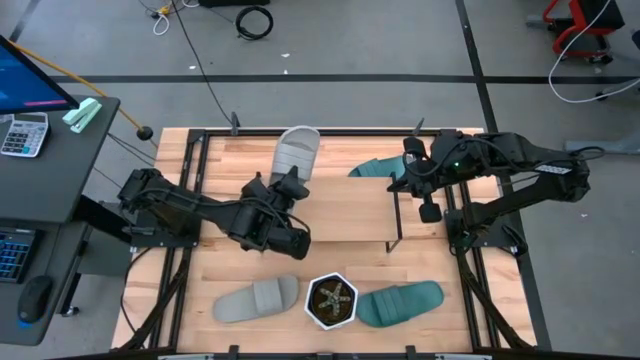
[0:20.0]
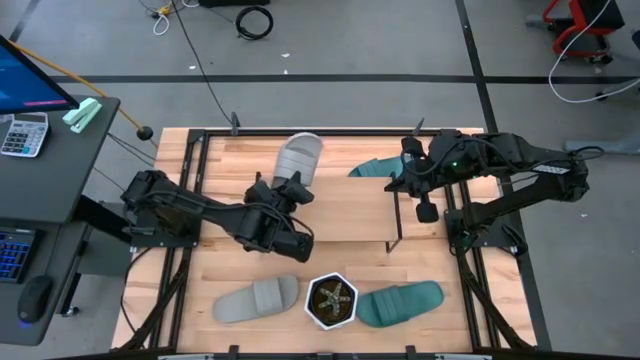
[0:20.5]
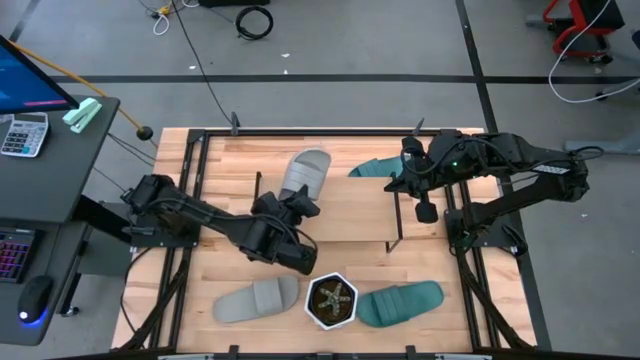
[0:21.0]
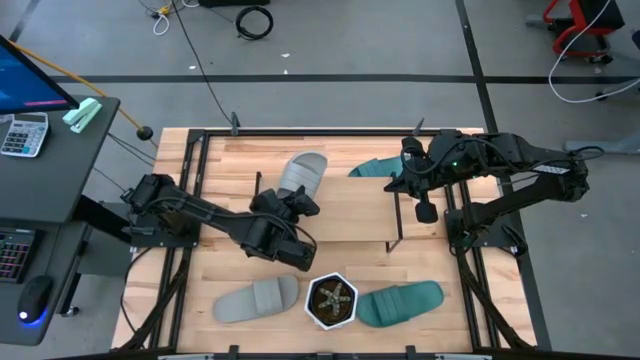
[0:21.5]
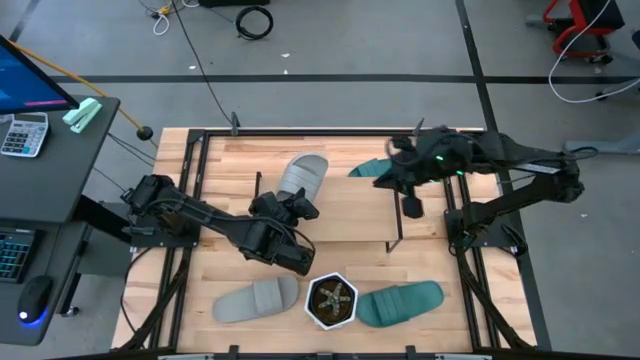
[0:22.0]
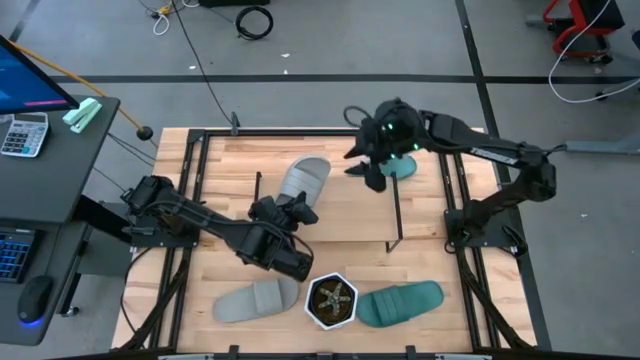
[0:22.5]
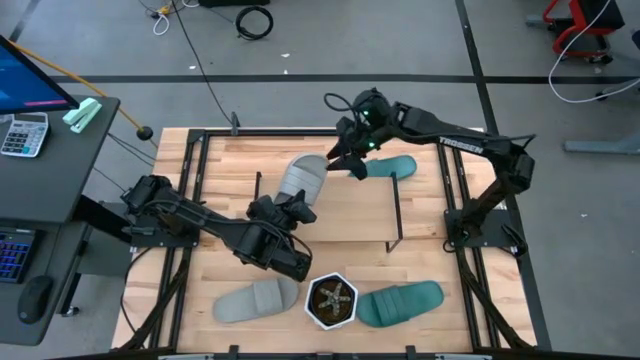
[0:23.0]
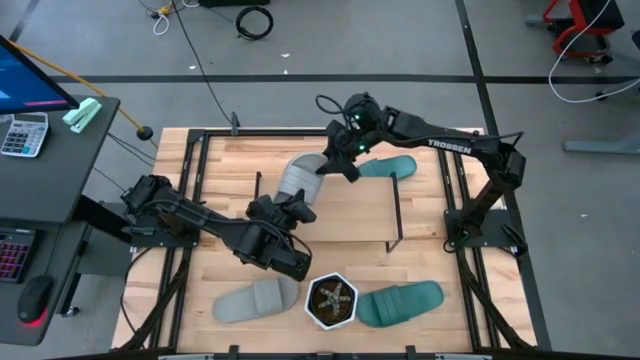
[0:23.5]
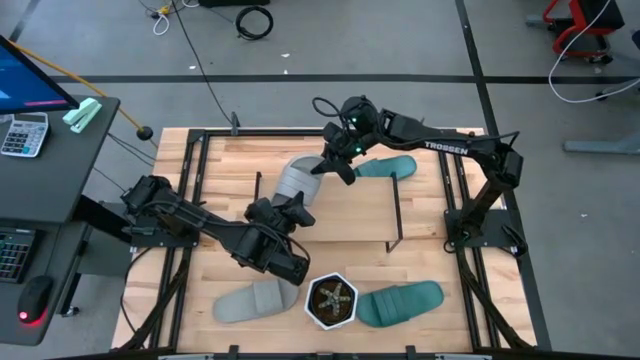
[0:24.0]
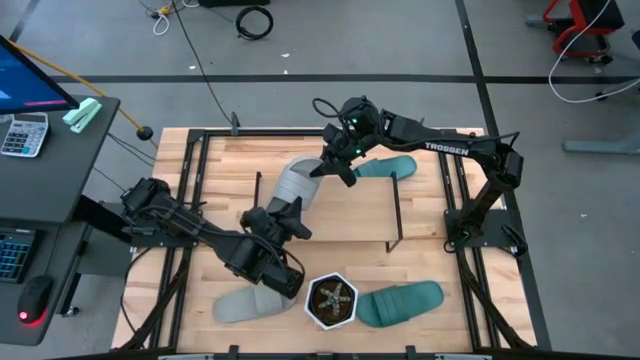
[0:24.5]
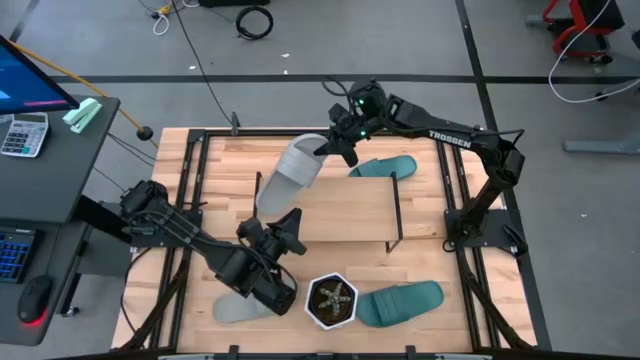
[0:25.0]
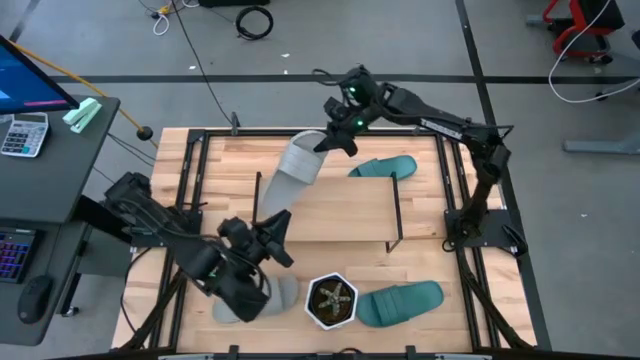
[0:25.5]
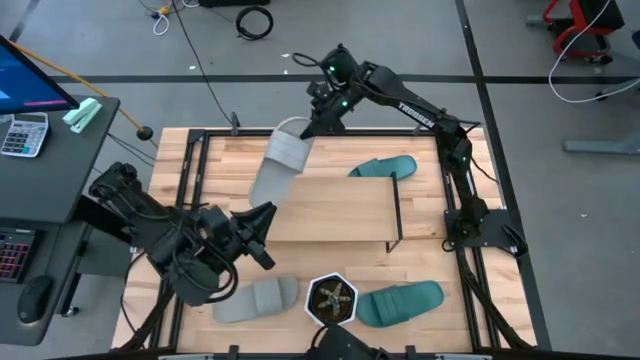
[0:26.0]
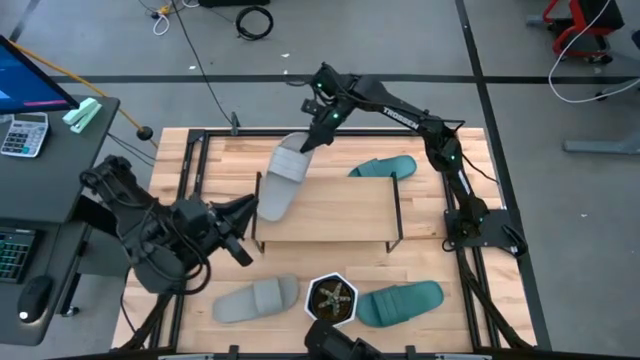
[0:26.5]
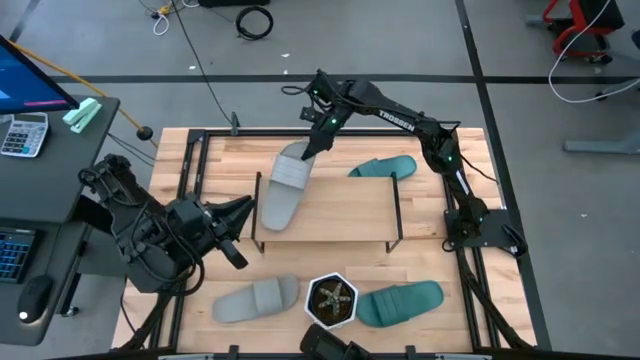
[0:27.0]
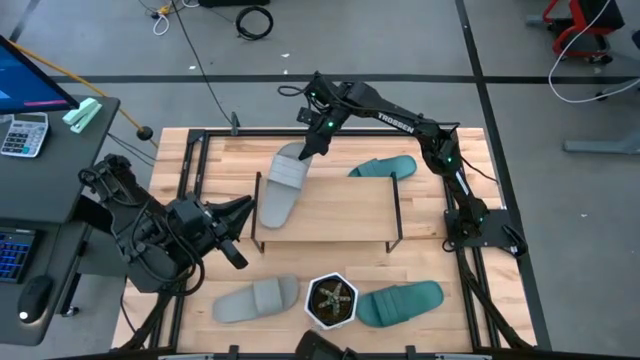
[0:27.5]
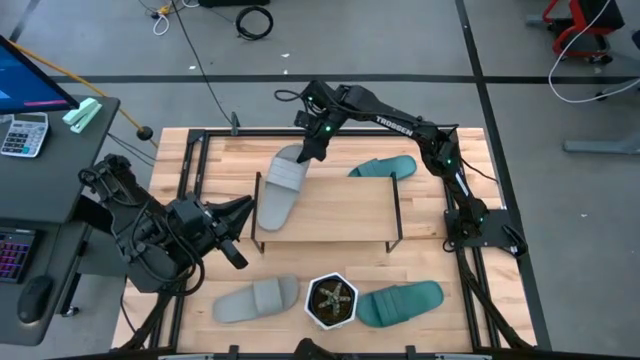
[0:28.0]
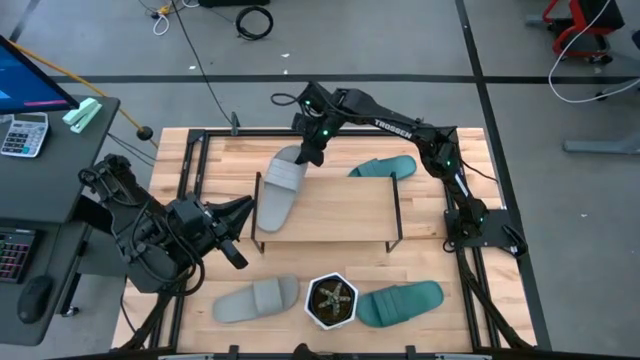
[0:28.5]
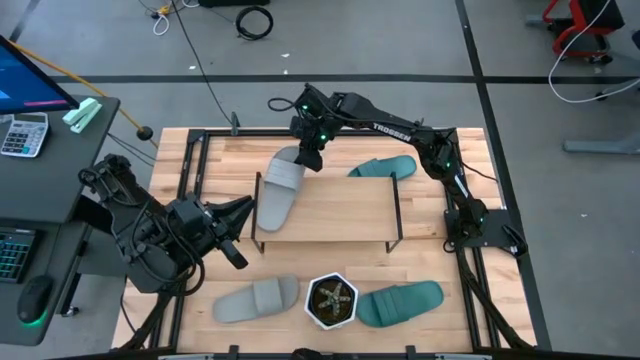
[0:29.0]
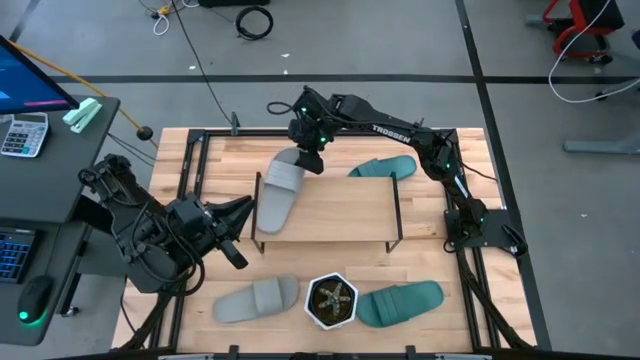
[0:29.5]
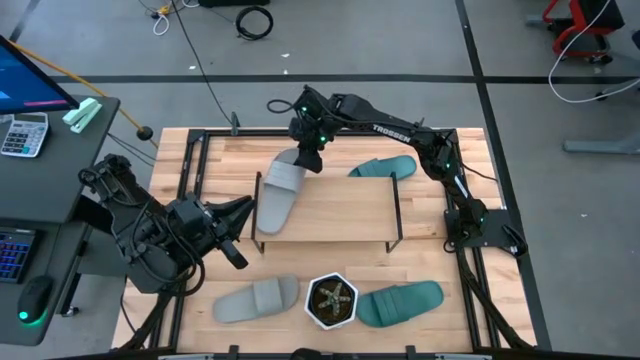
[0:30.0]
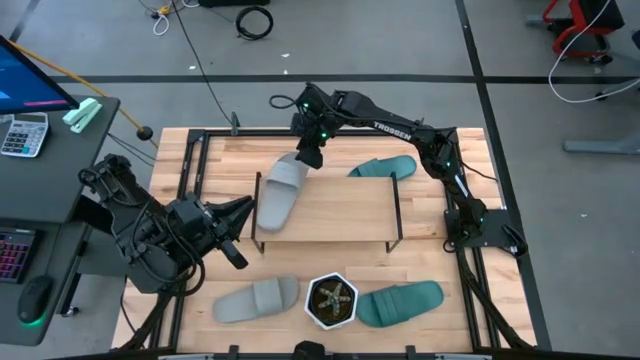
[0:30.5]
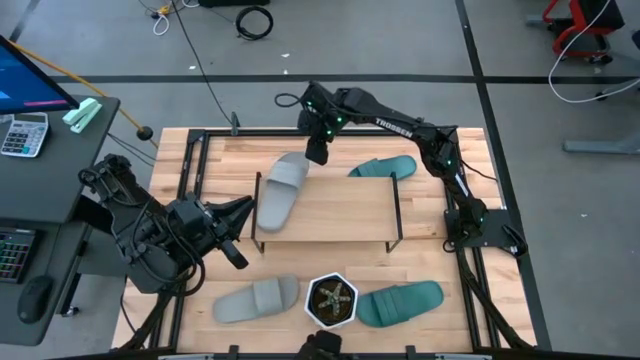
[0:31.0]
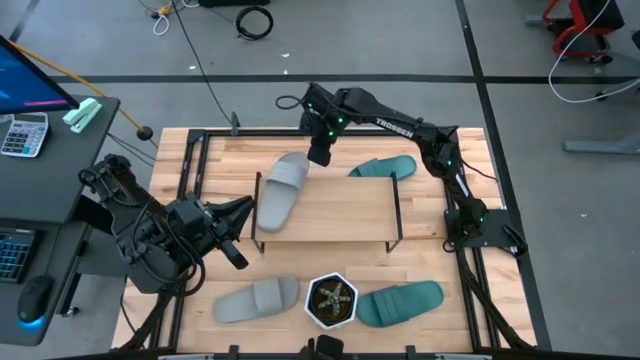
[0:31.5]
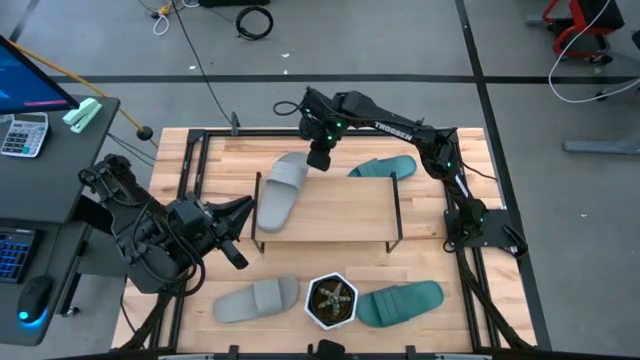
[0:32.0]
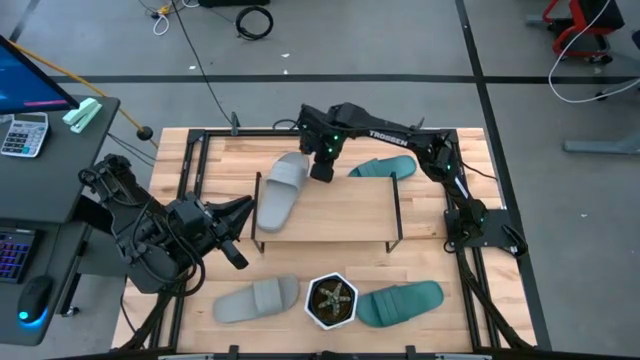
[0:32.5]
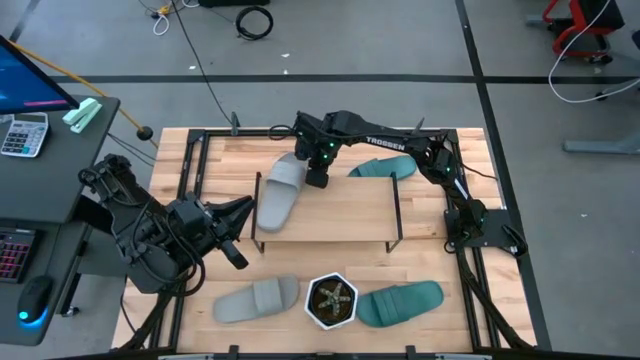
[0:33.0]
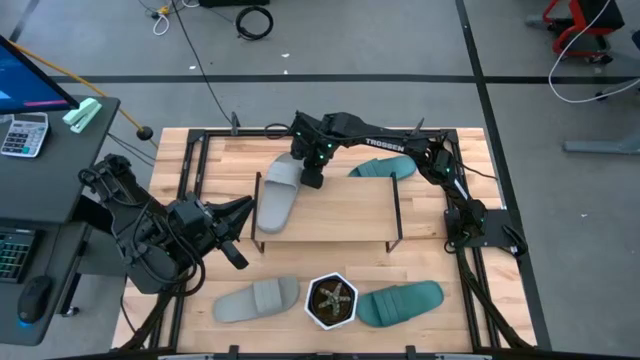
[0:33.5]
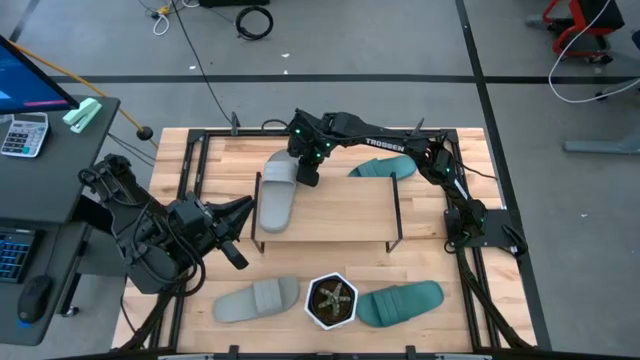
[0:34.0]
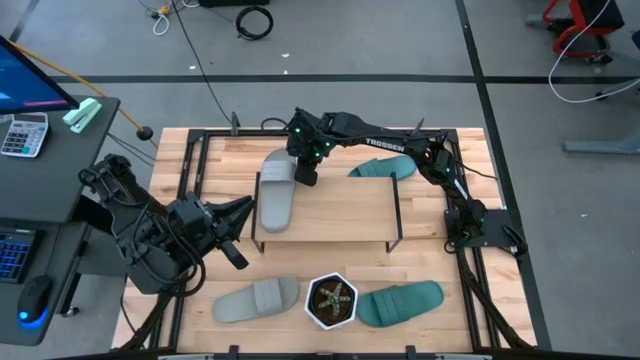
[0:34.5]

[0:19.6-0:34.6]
Task: Pick and place slides into the shelf
Put the top gray slide on the shelf

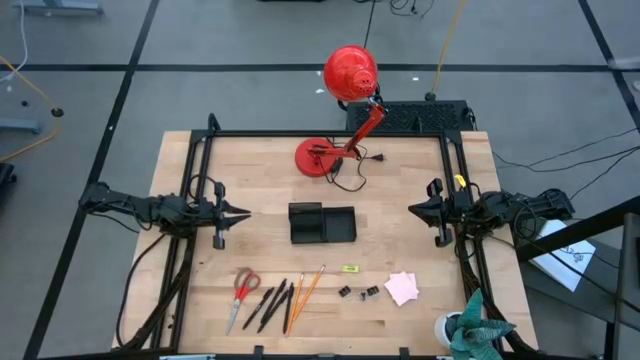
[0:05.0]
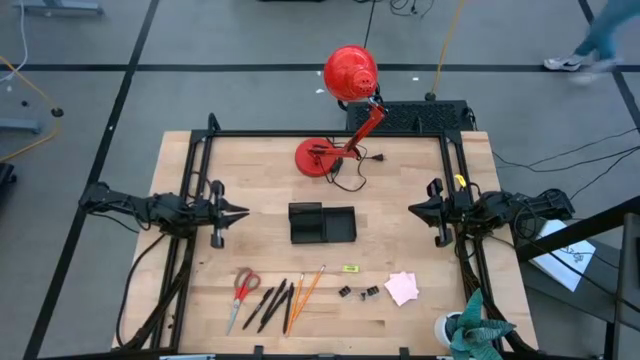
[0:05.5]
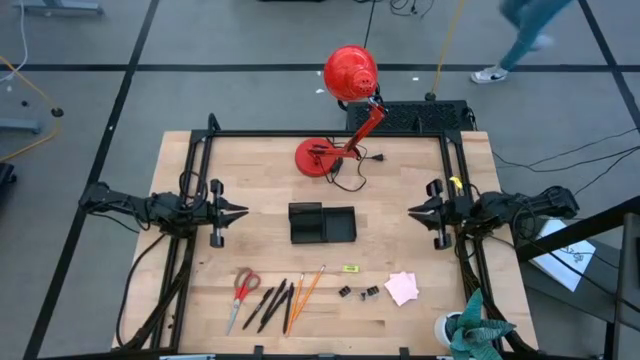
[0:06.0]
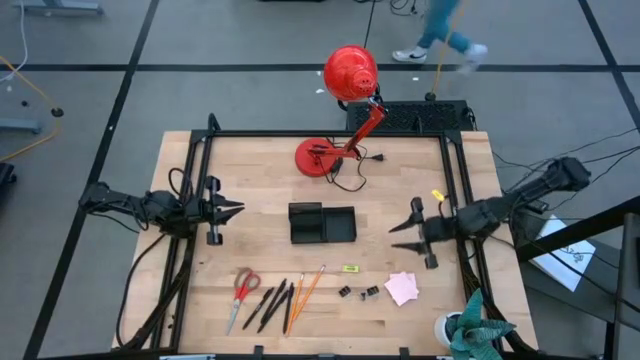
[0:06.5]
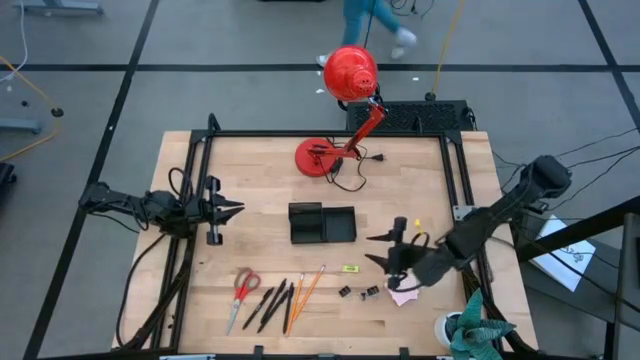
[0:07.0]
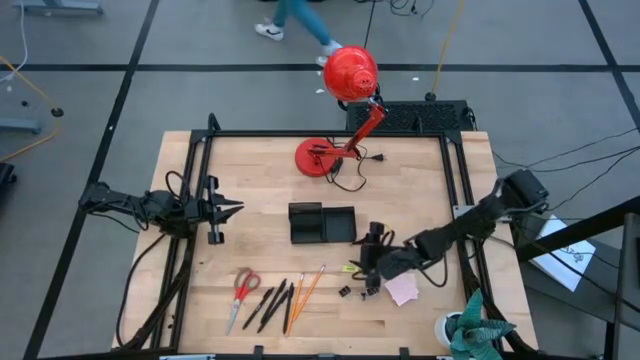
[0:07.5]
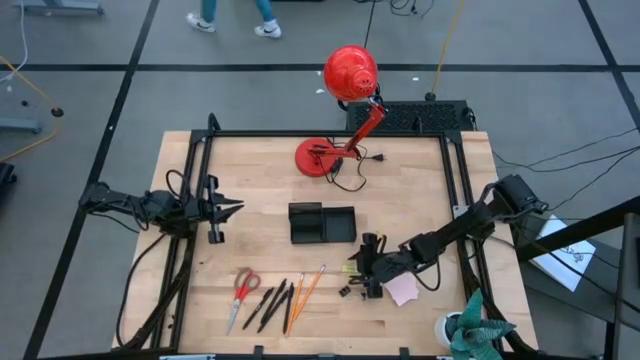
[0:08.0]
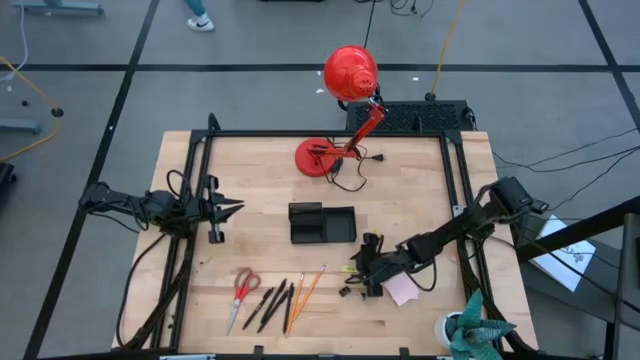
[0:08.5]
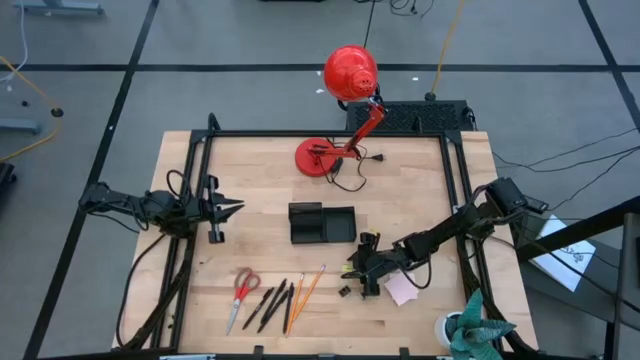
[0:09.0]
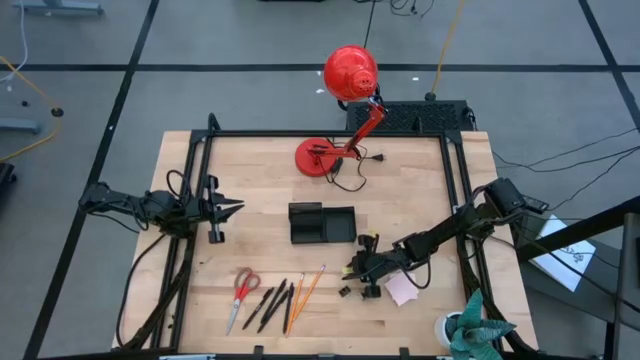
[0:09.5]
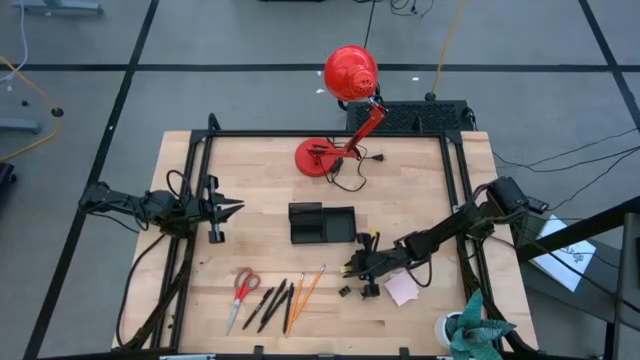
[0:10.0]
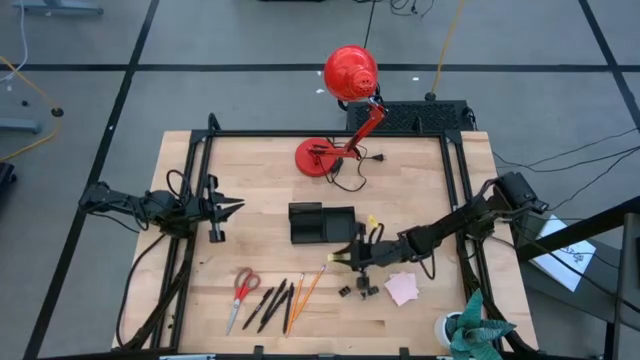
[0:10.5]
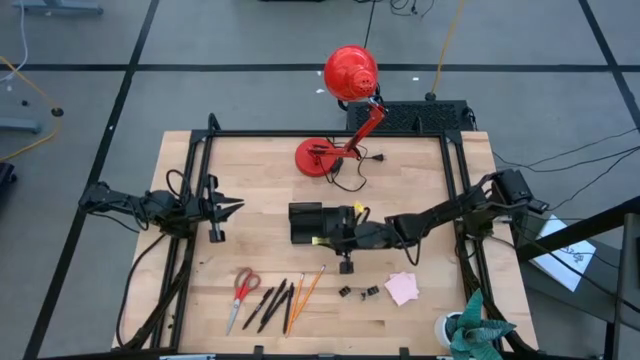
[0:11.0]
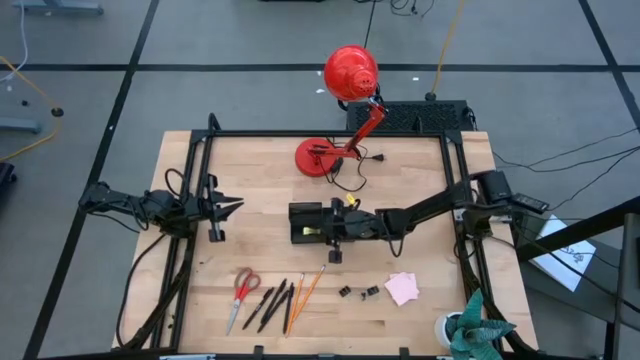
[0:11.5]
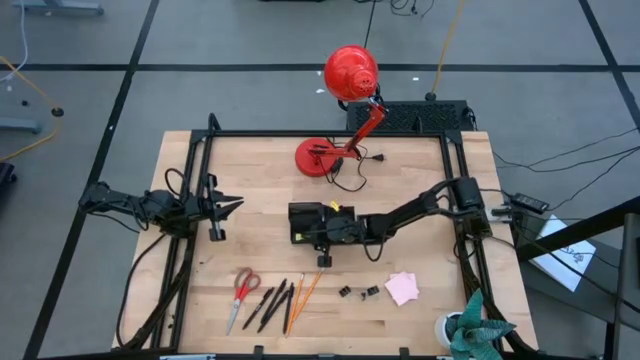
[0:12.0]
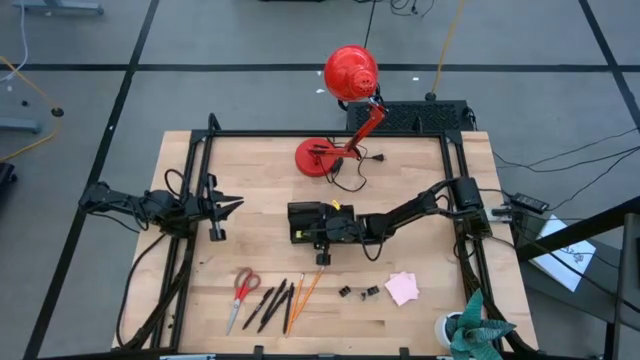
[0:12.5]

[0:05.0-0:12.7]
Task: Pick and place office supplies into organizer
Put the eraser into the desk organizer
